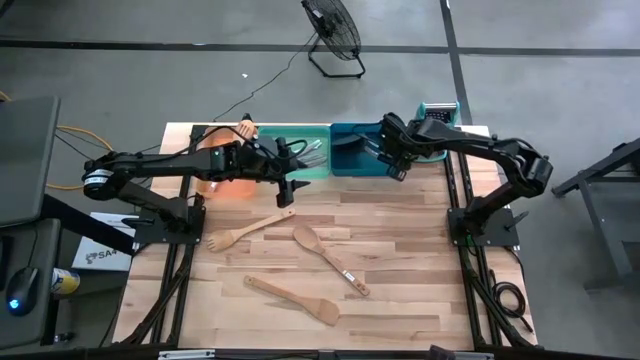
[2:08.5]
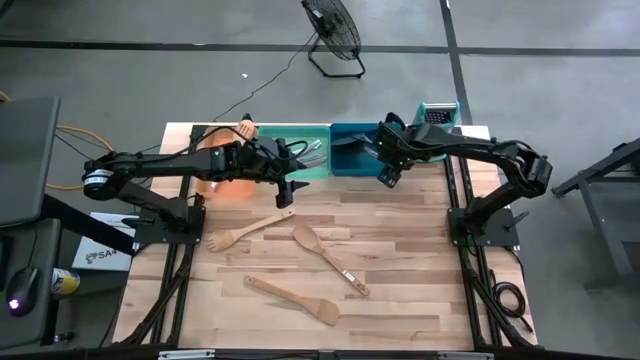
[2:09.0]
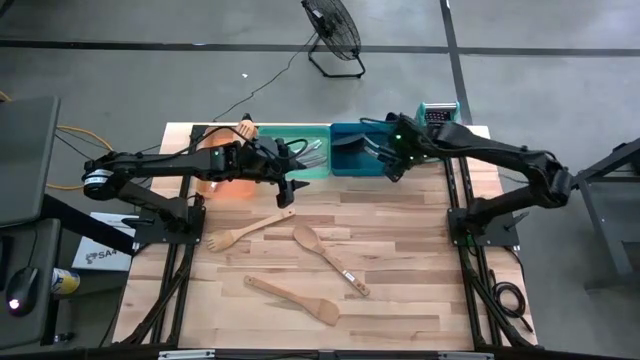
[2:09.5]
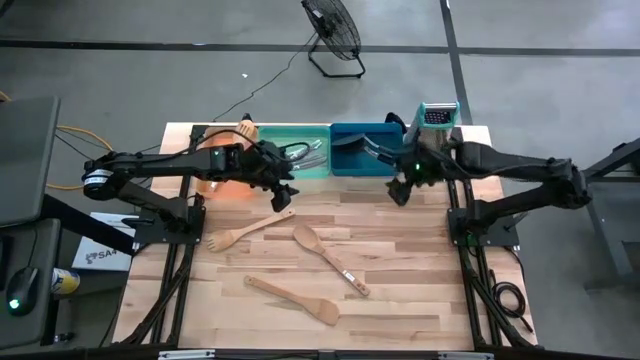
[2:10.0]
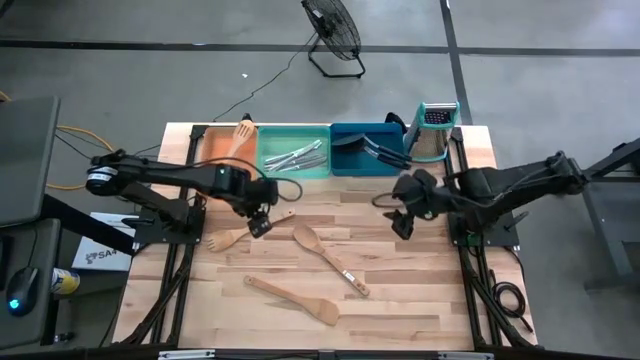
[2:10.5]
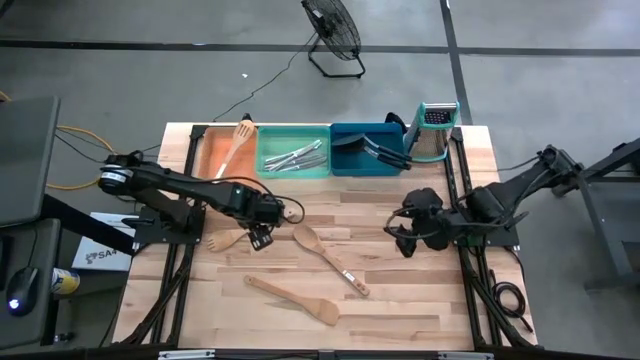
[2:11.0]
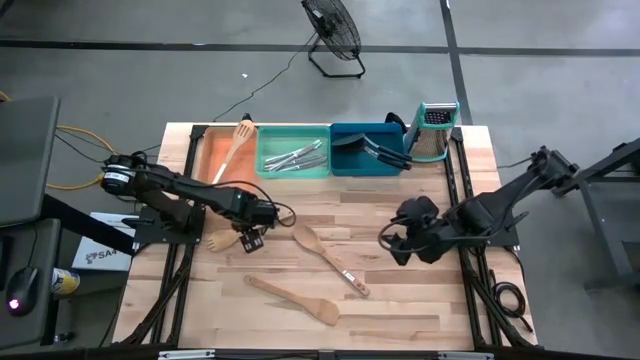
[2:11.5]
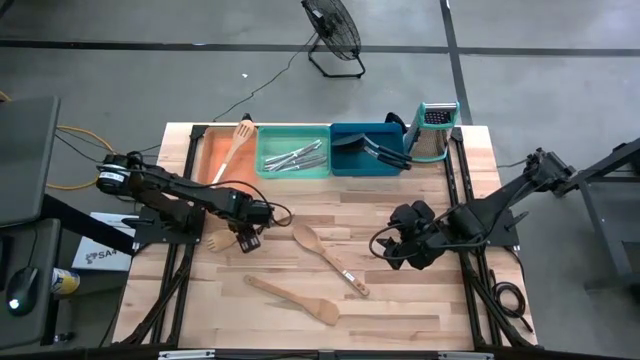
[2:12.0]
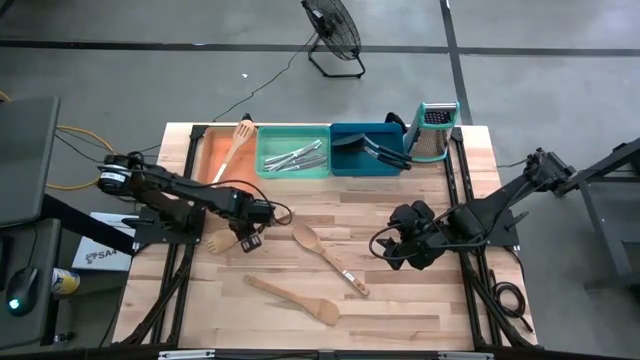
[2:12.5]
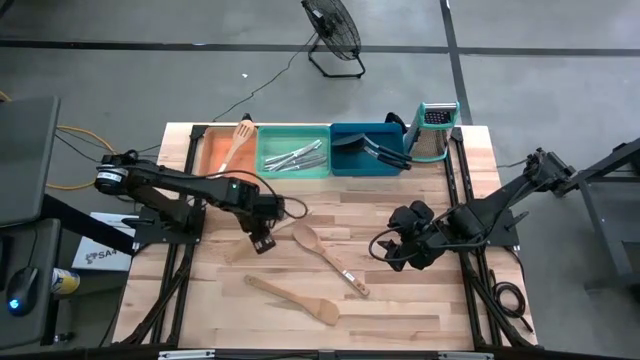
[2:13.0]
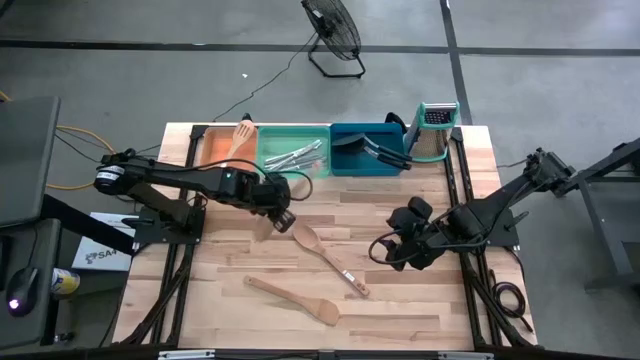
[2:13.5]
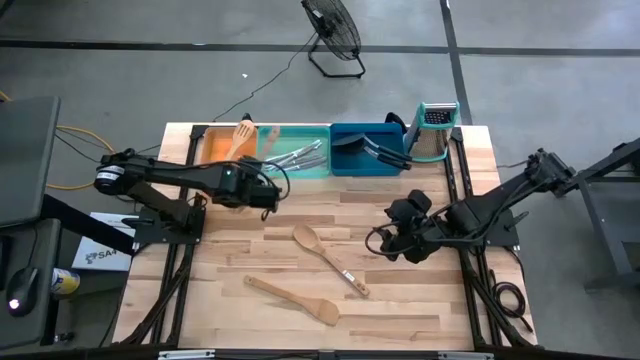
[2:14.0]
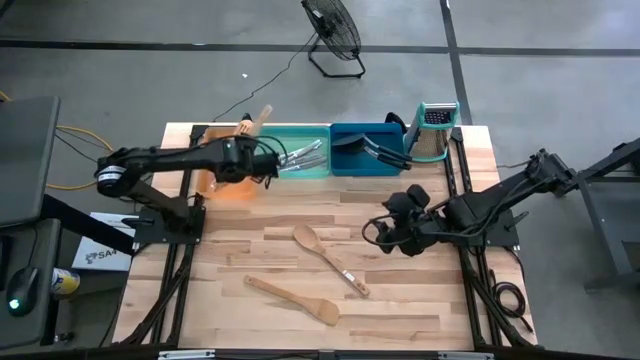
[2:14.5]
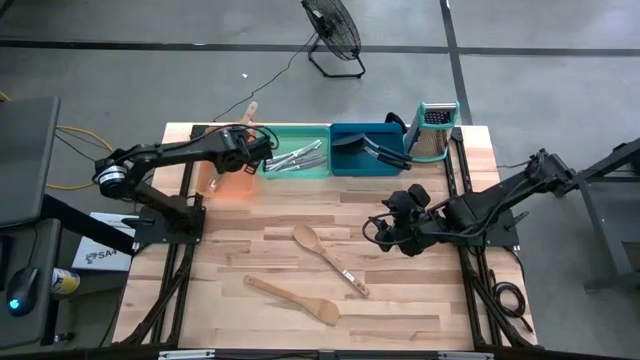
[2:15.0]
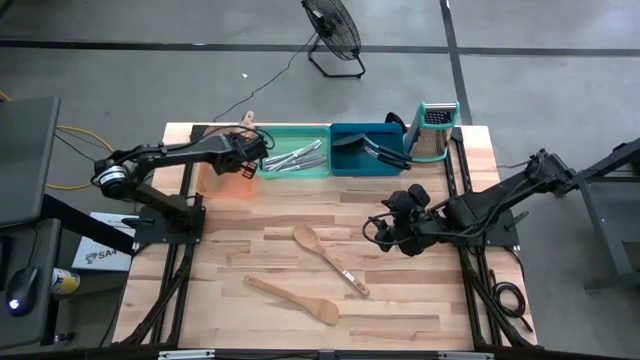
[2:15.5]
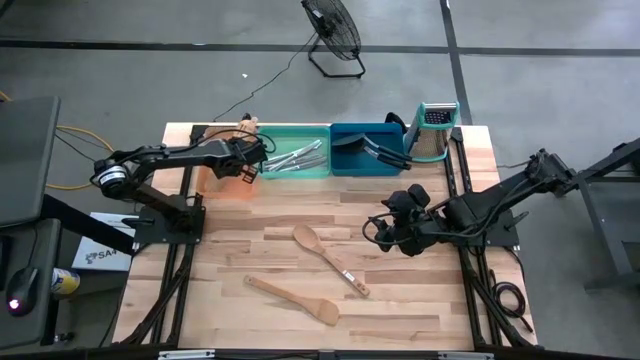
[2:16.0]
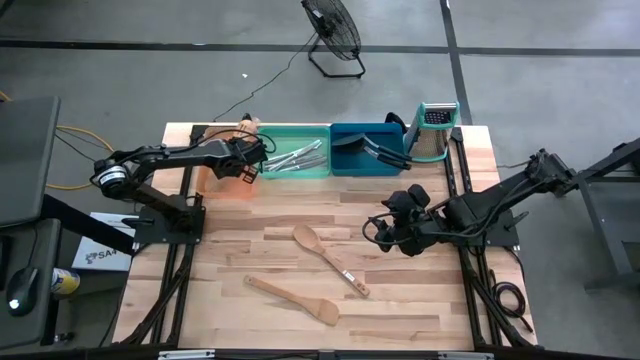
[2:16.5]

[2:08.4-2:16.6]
Task: Pick & Place Kitchen Items
Put the brown serving spoon into the orange bin

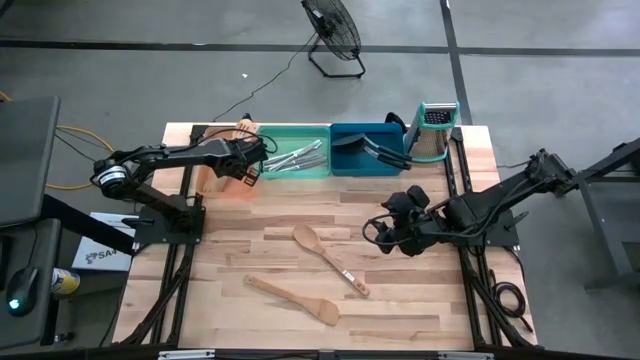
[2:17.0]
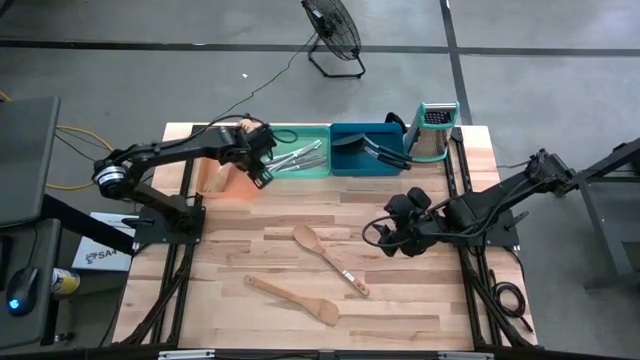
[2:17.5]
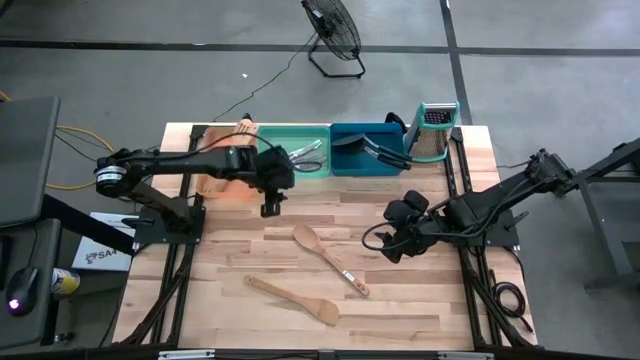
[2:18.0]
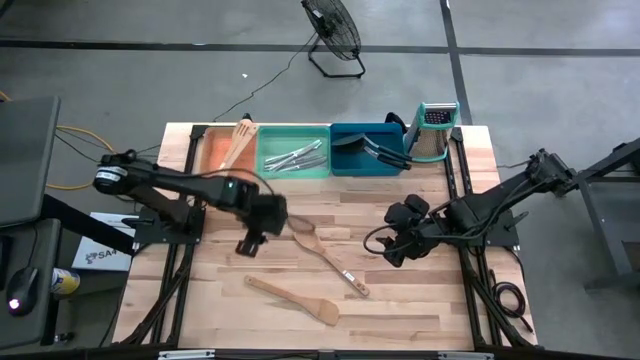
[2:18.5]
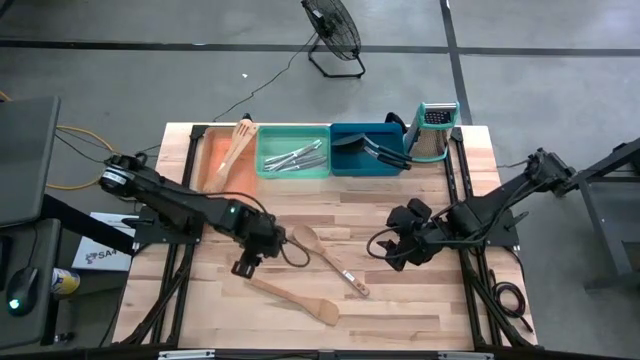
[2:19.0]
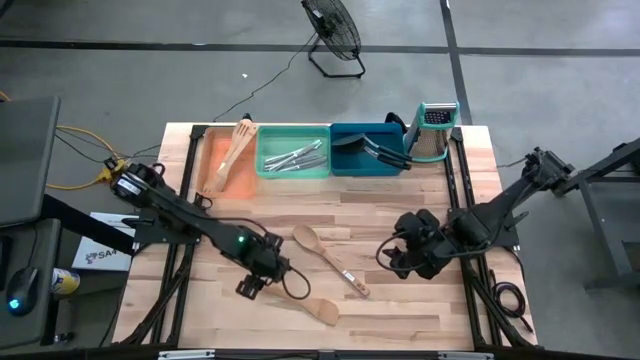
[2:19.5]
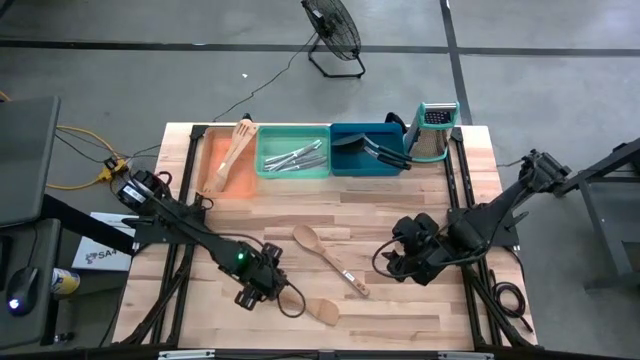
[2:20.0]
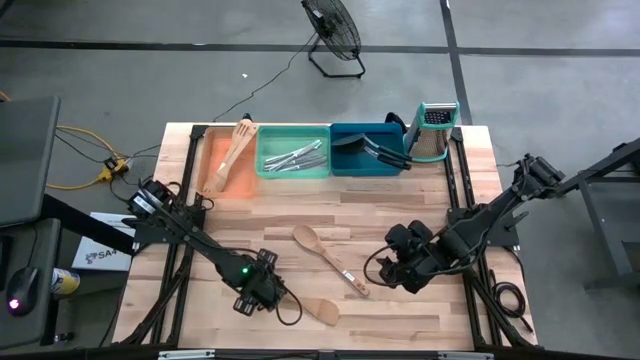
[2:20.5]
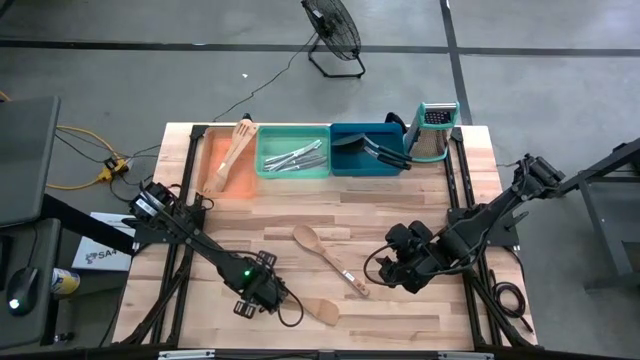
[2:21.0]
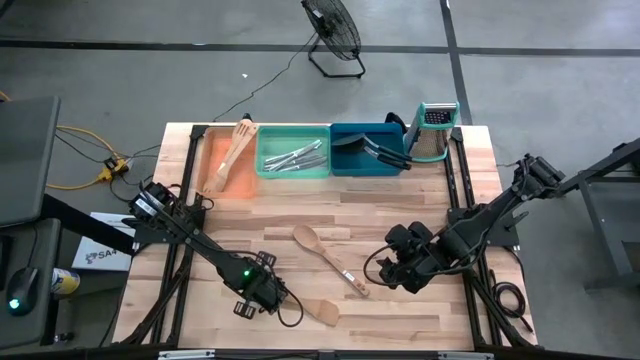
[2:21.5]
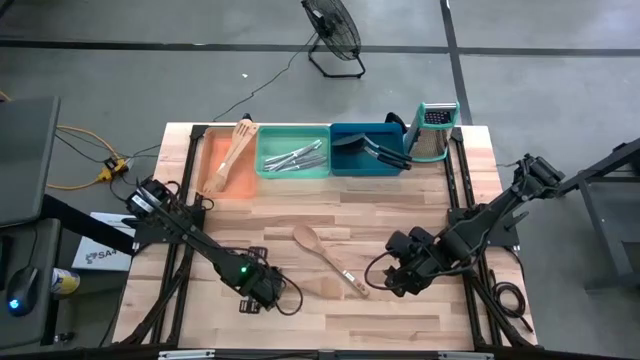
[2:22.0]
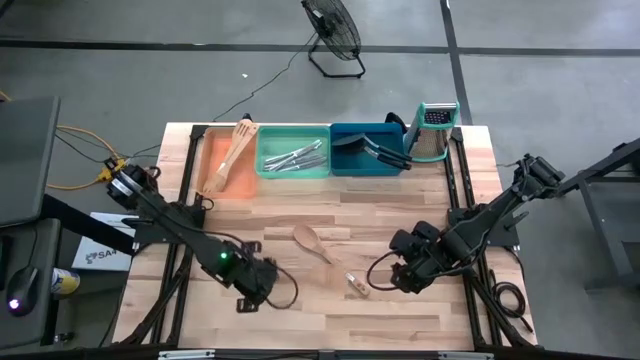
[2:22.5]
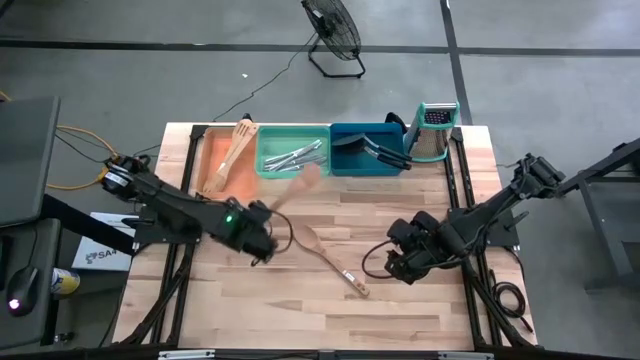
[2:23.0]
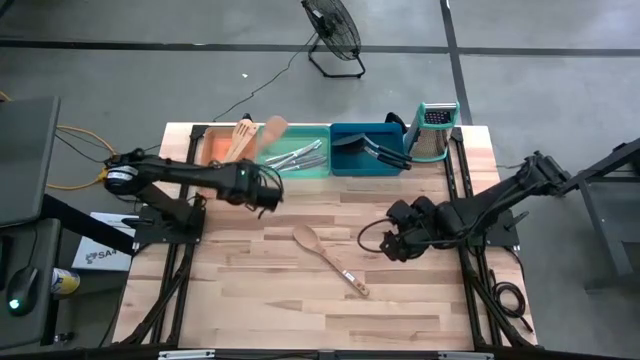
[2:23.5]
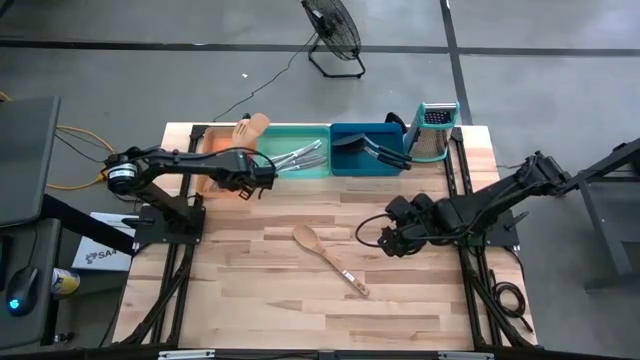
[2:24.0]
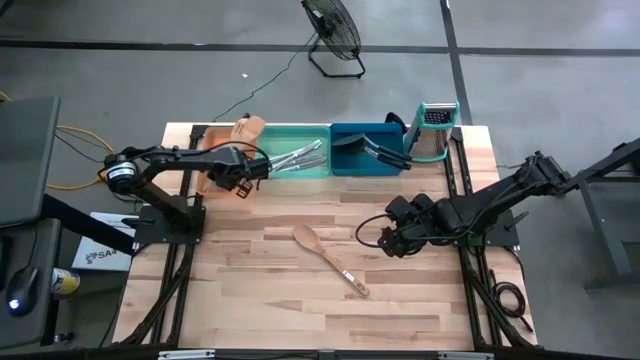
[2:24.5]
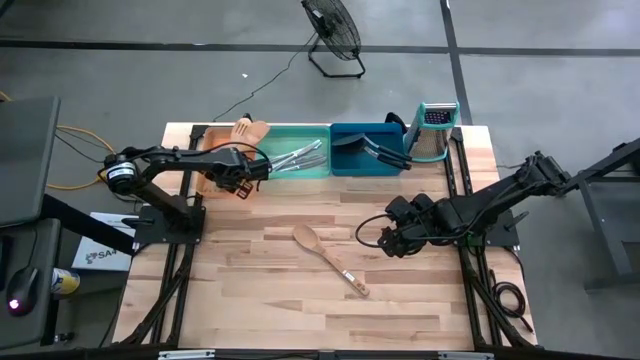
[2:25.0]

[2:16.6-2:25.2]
Put the brown serving spoon into the orange bin
